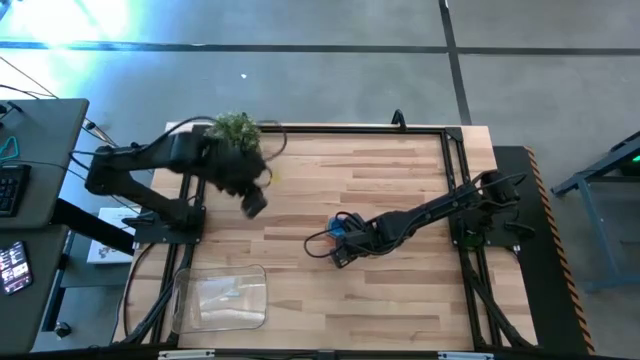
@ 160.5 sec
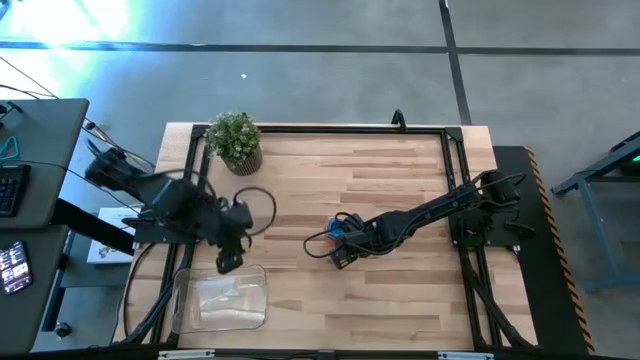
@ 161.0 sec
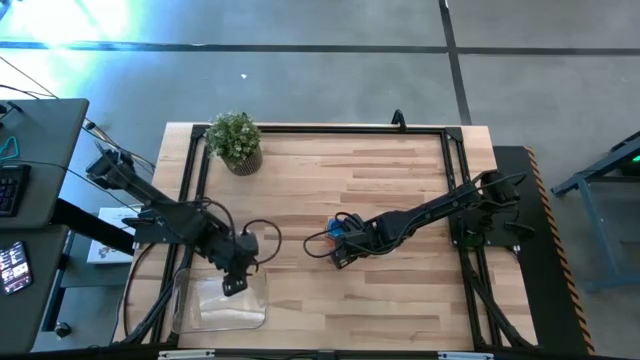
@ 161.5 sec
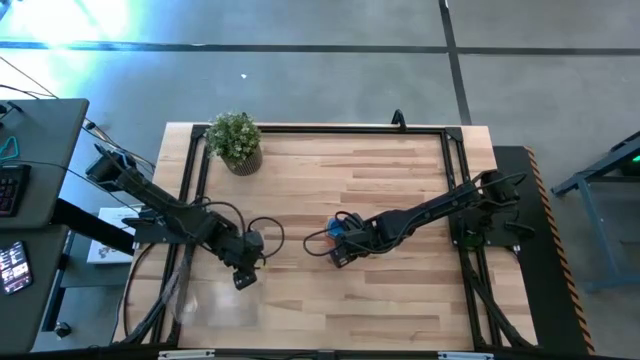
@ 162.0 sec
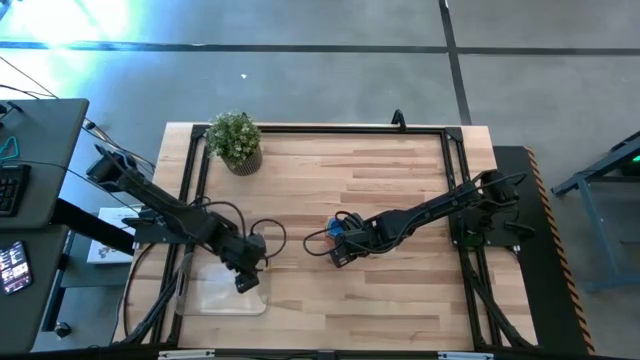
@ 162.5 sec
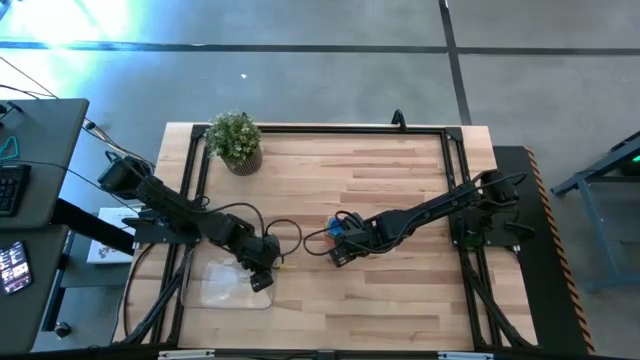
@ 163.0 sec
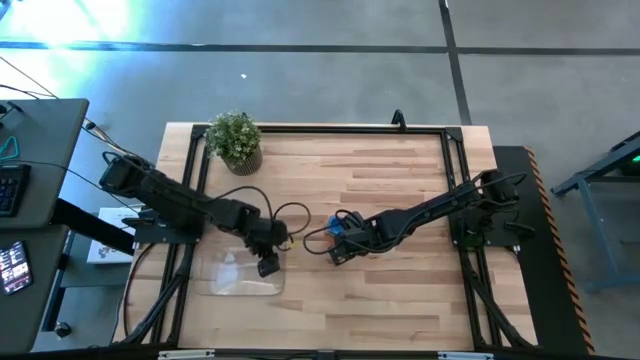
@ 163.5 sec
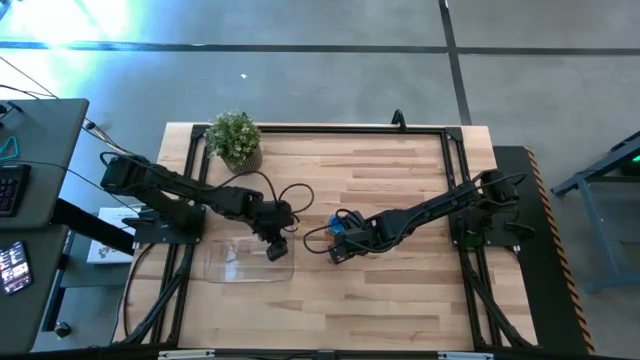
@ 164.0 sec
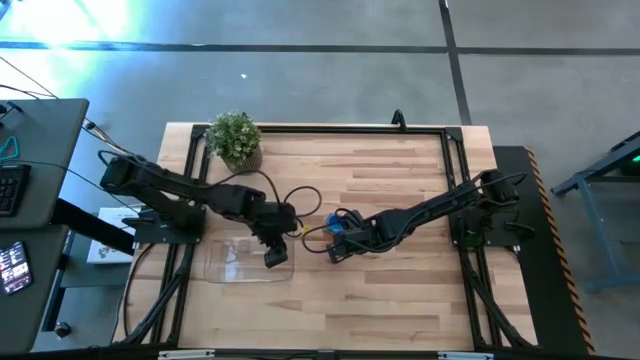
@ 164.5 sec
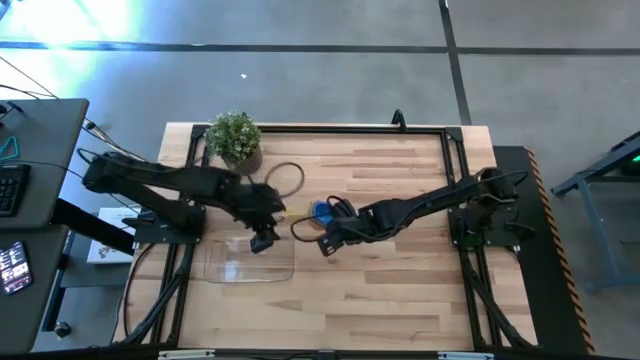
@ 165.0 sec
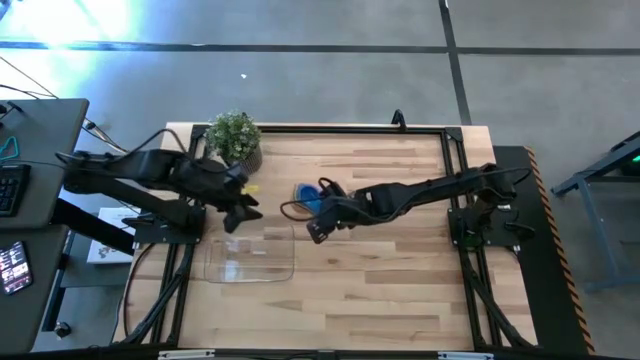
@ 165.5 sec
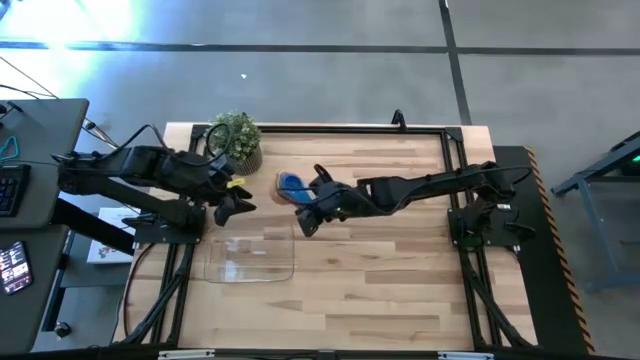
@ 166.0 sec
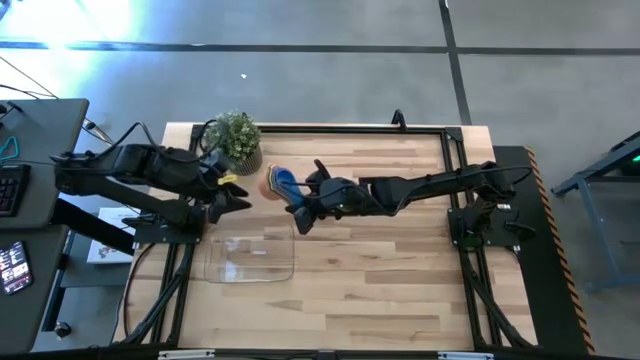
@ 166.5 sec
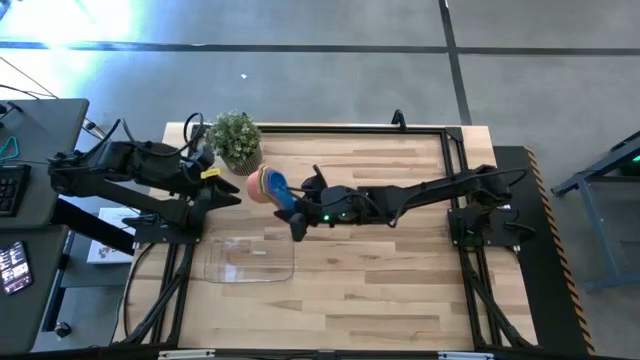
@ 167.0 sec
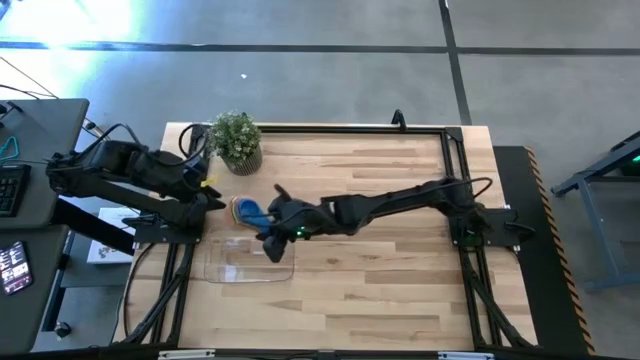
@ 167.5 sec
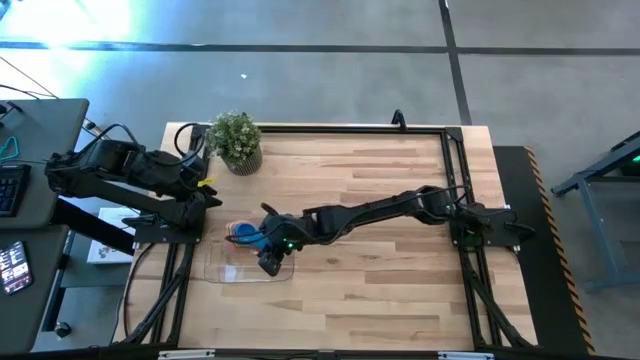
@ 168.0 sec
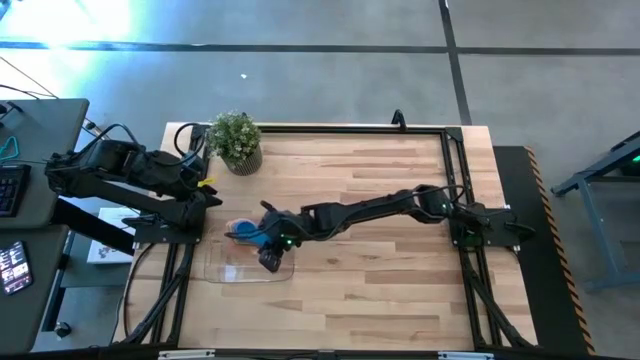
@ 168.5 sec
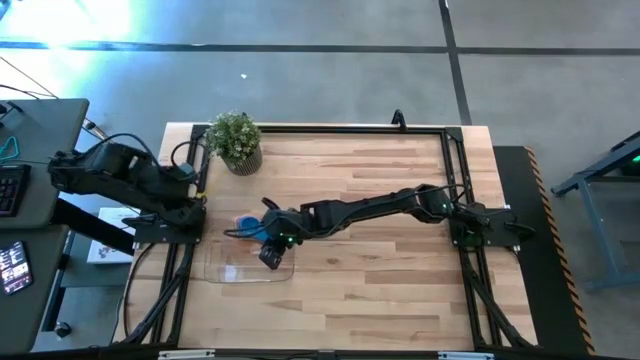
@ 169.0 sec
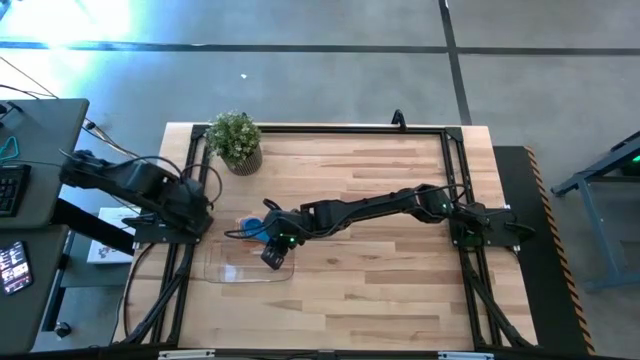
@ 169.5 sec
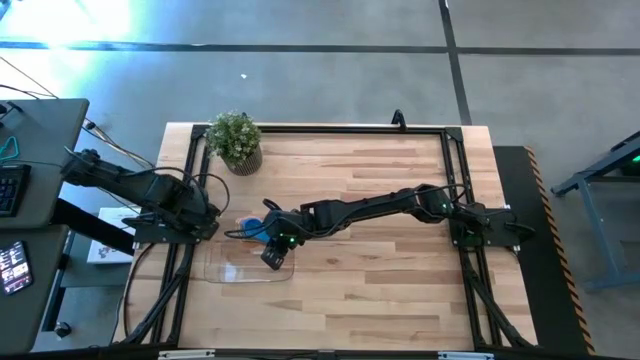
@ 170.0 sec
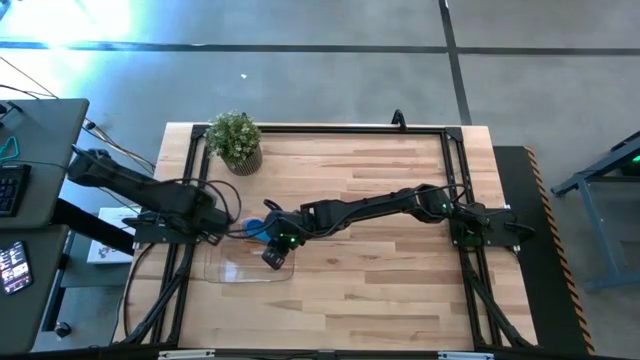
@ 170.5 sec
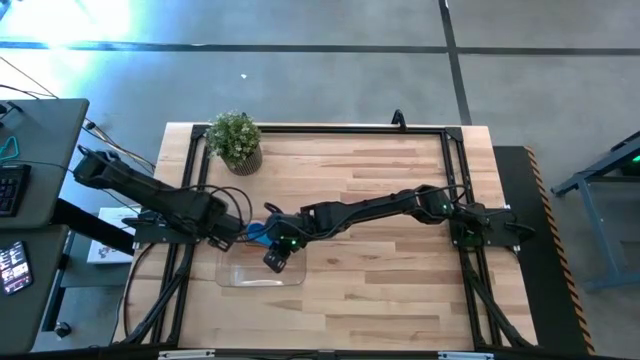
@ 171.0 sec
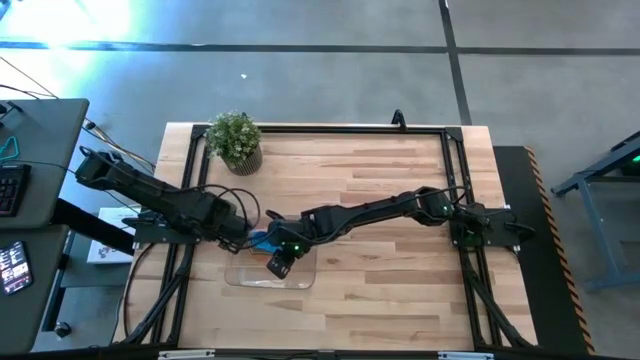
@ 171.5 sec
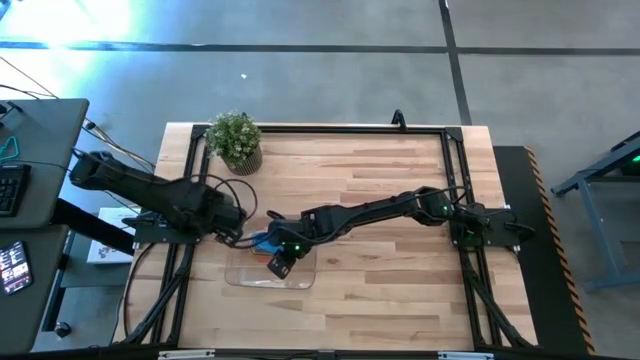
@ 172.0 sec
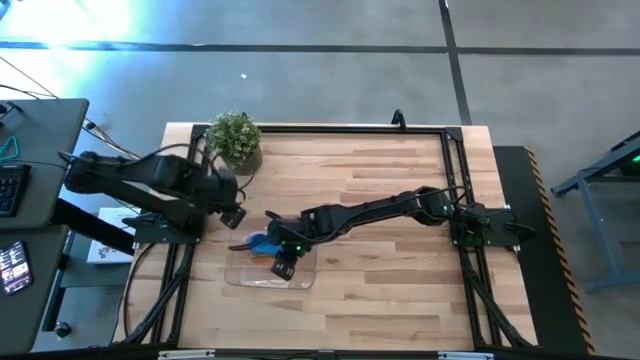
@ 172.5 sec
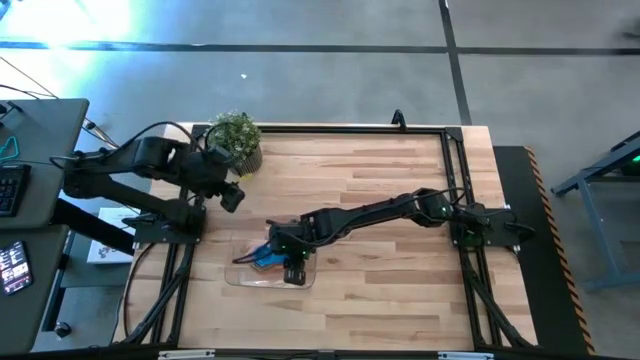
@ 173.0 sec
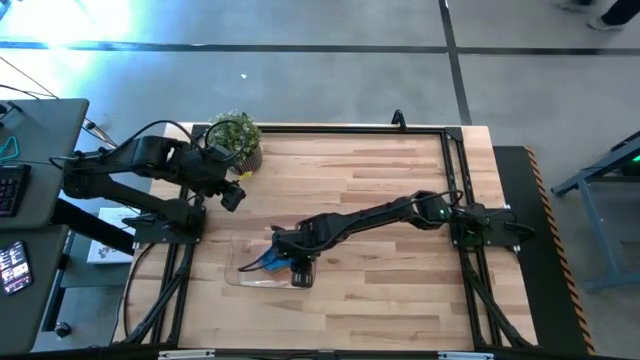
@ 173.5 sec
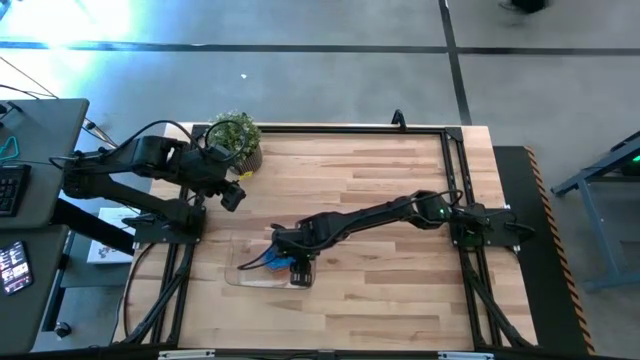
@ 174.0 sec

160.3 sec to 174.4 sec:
Task: Nest measuring cups in basket
Put the nested measuring cups into the transparent bin

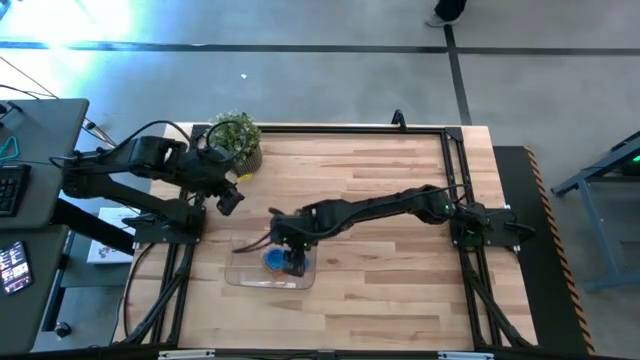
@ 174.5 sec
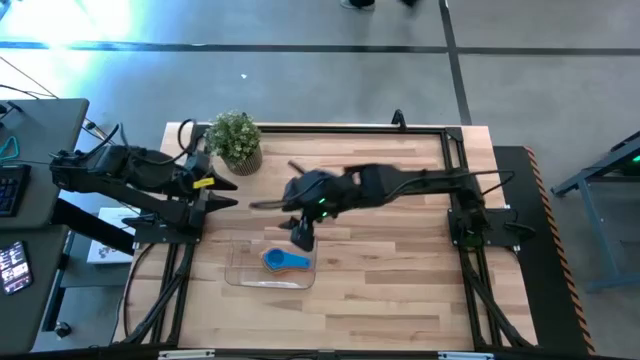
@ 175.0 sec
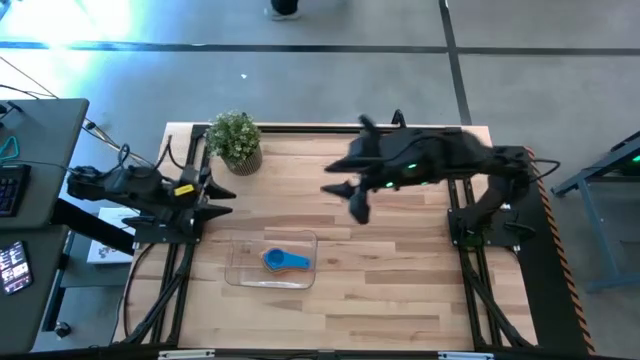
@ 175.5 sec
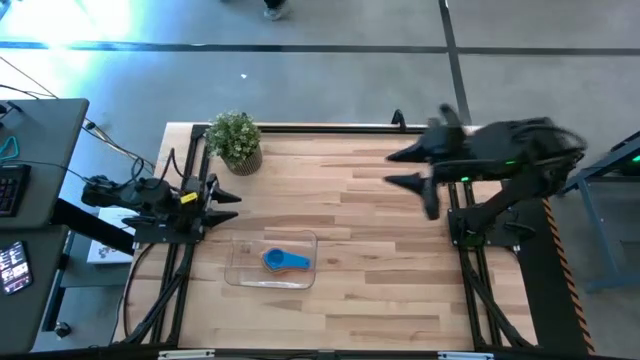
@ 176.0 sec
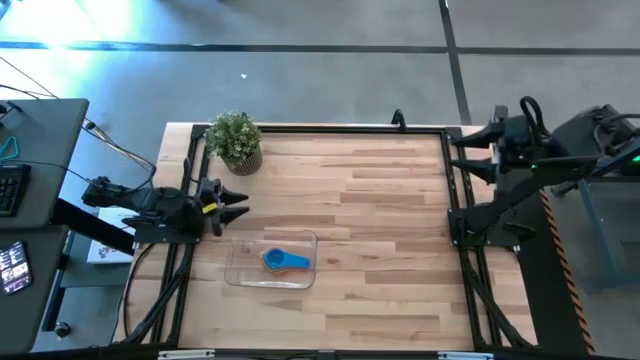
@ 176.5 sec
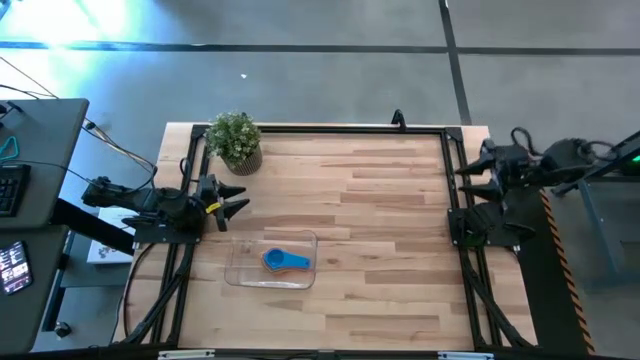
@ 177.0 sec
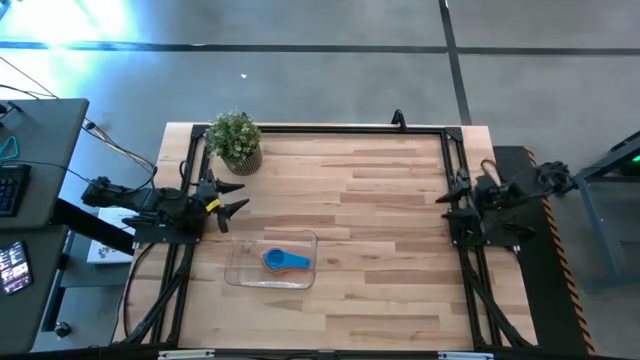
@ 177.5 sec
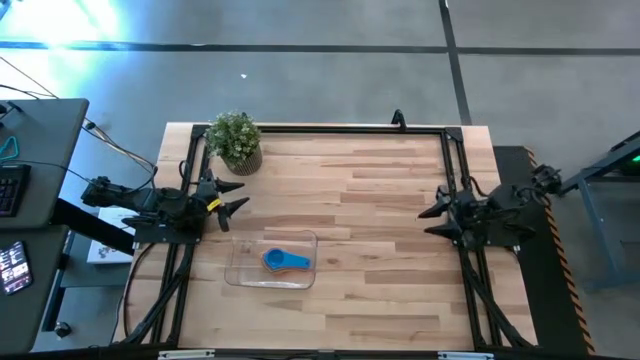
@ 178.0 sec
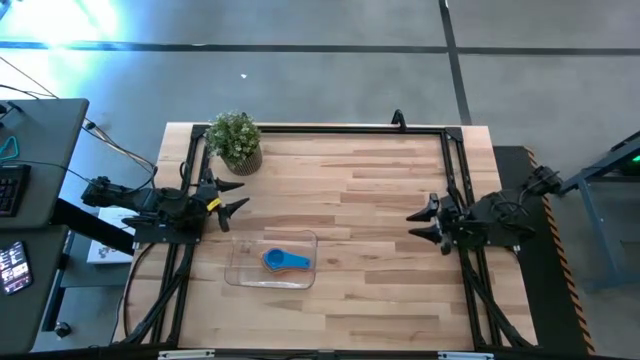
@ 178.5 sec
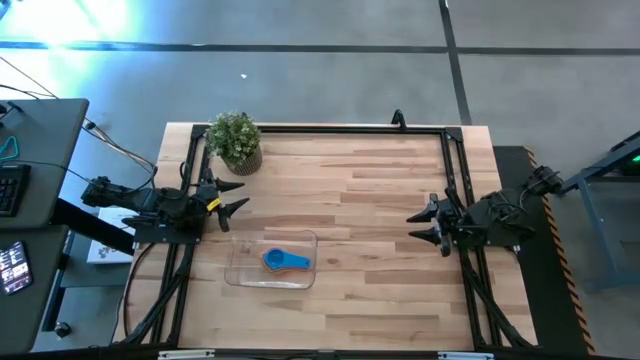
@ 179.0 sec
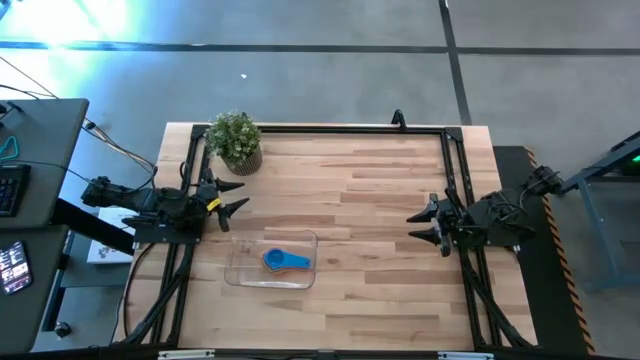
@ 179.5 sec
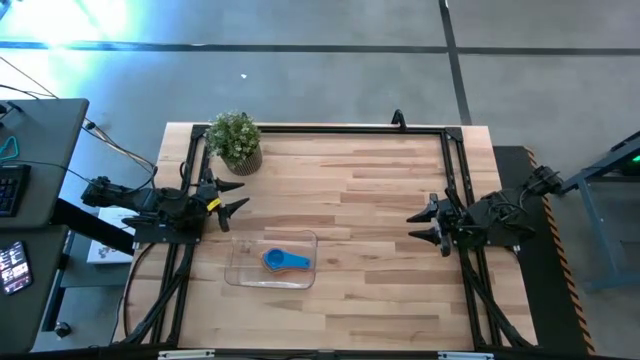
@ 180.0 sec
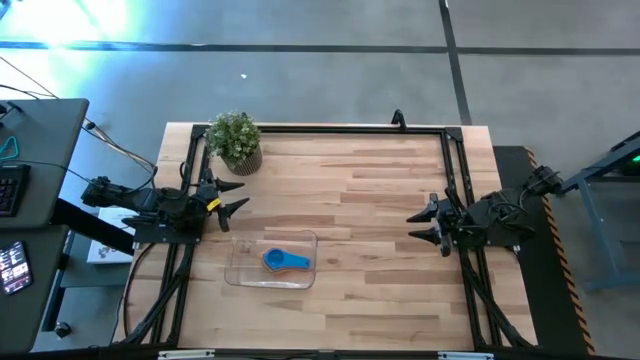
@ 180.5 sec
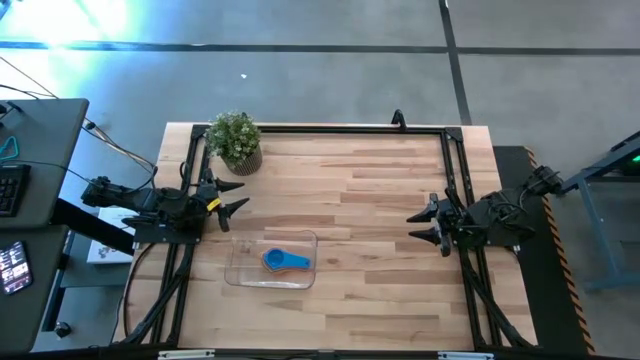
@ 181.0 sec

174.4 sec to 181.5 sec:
Return to Home Position

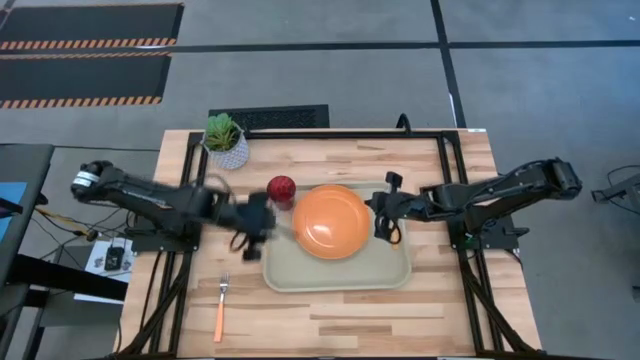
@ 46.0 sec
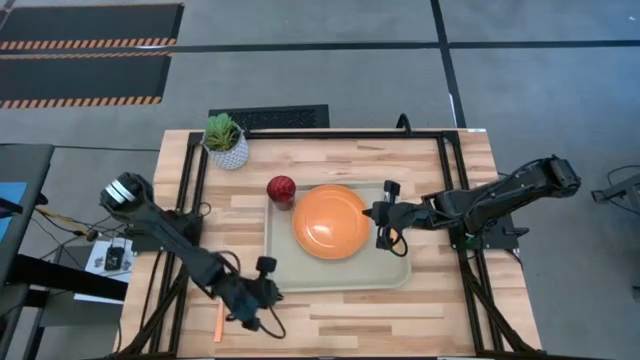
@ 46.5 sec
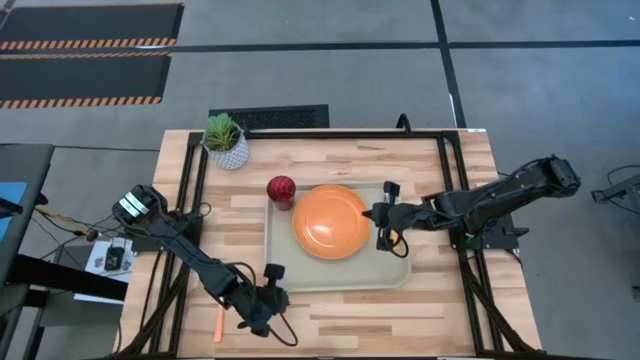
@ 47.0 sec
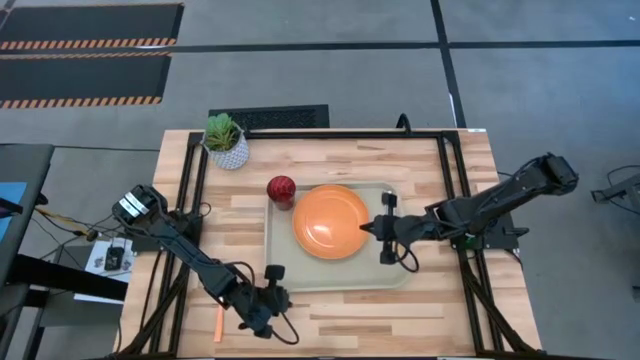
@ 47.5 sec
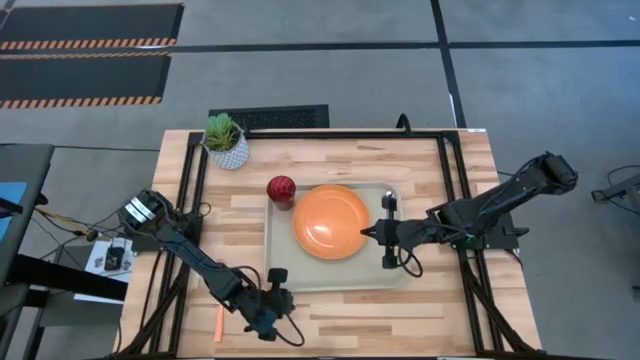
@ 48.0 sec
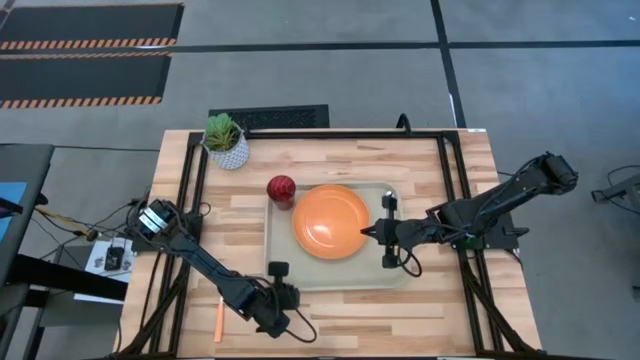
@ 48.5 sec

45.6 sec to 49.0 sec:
Task: Pick and place plate/cup/fork/spoon on tray
Adjust the gray serving tray
